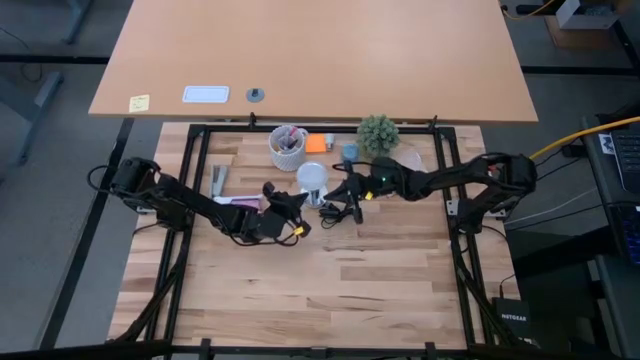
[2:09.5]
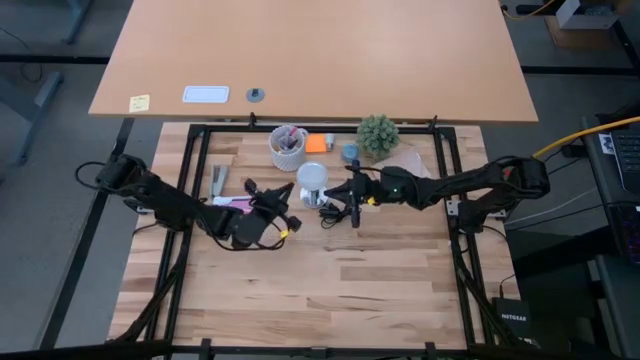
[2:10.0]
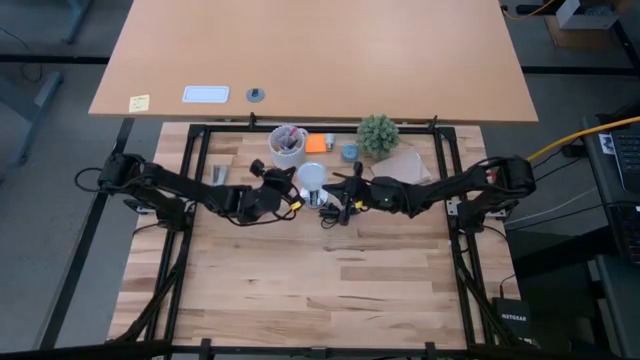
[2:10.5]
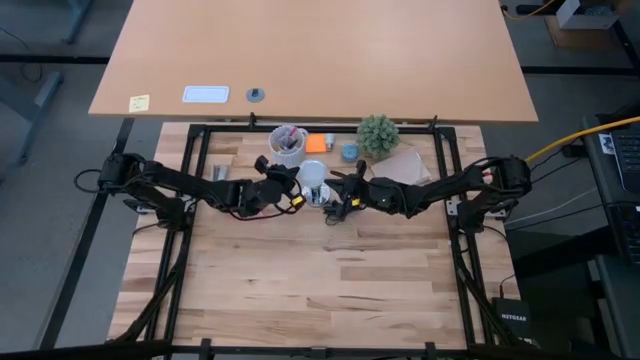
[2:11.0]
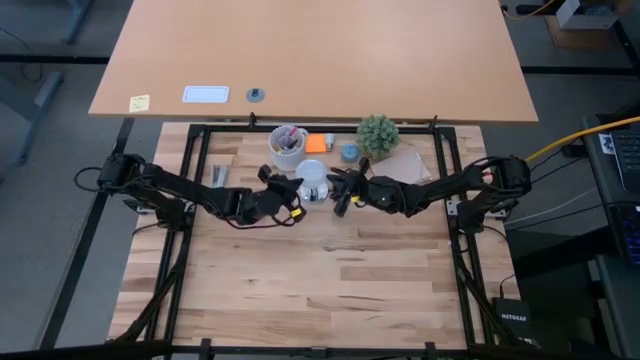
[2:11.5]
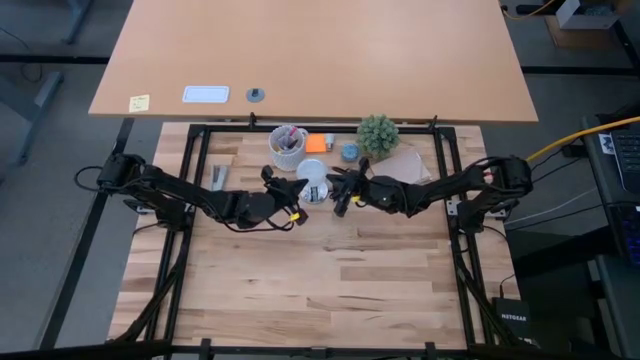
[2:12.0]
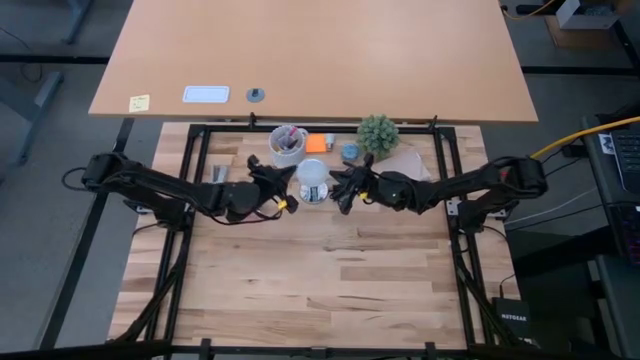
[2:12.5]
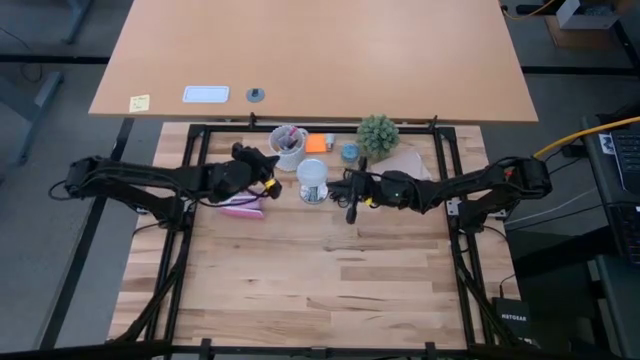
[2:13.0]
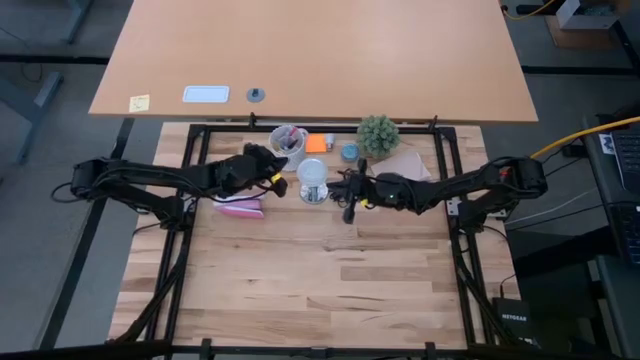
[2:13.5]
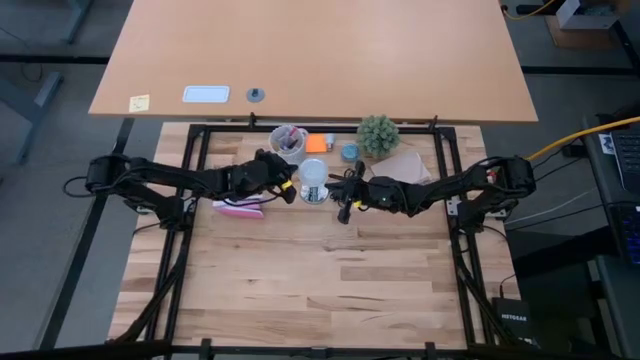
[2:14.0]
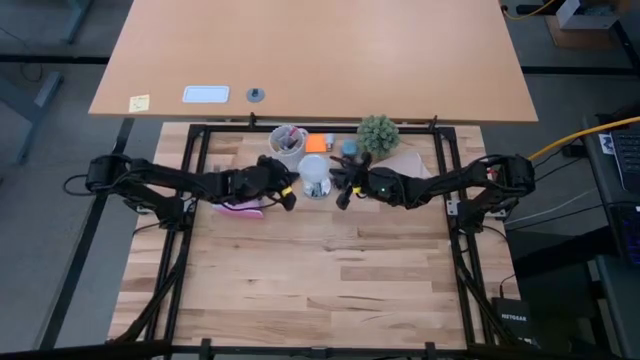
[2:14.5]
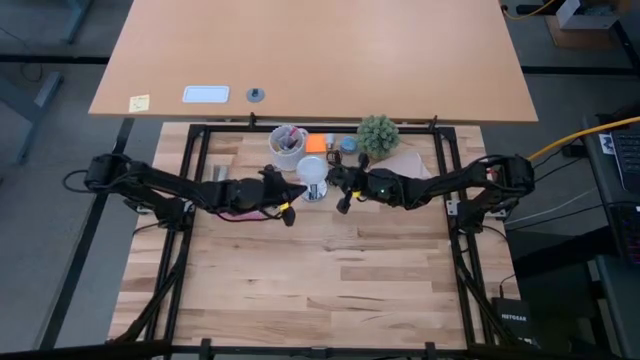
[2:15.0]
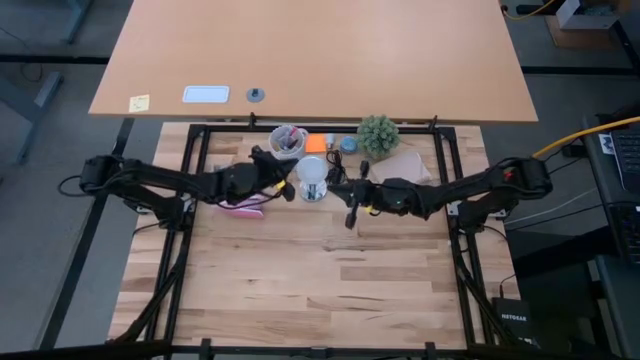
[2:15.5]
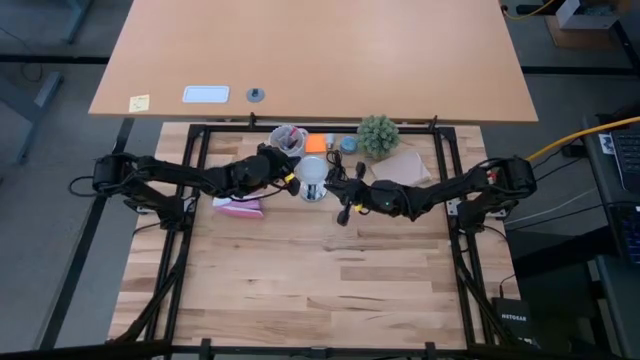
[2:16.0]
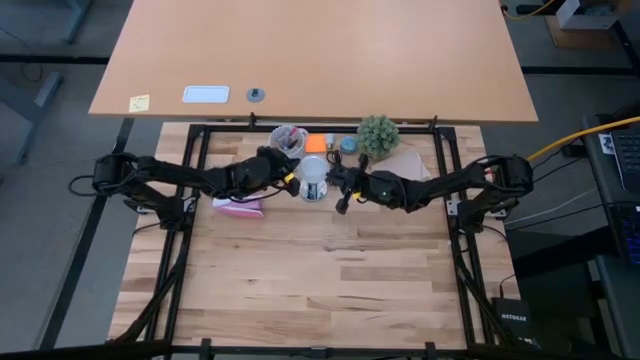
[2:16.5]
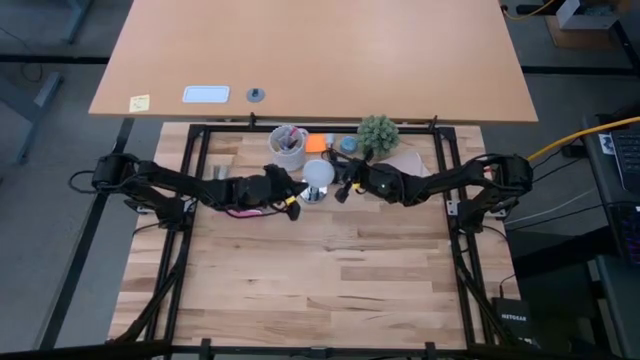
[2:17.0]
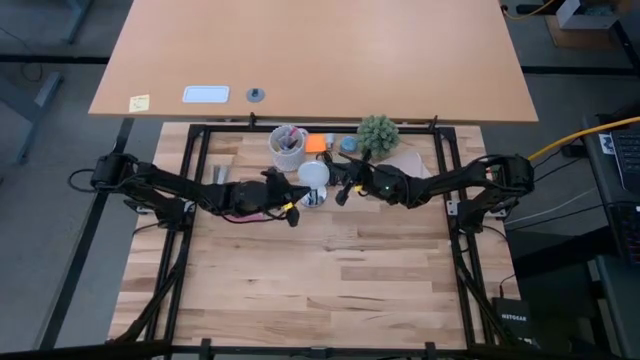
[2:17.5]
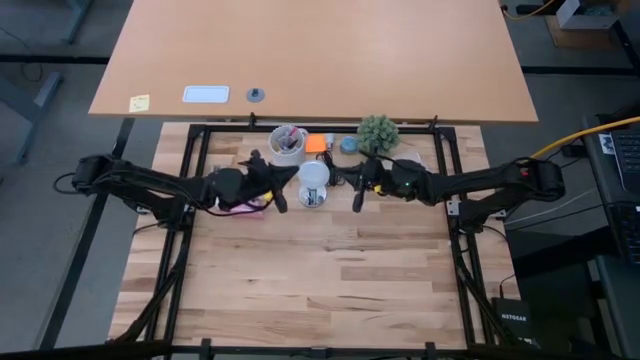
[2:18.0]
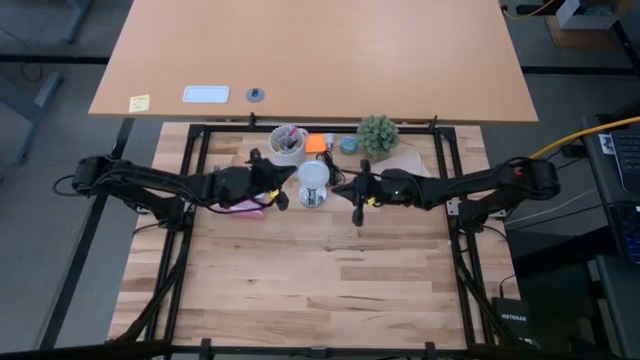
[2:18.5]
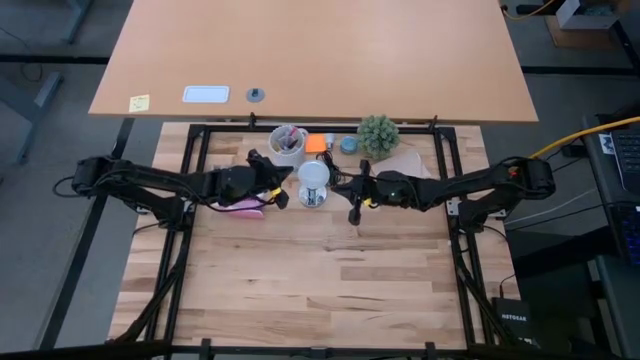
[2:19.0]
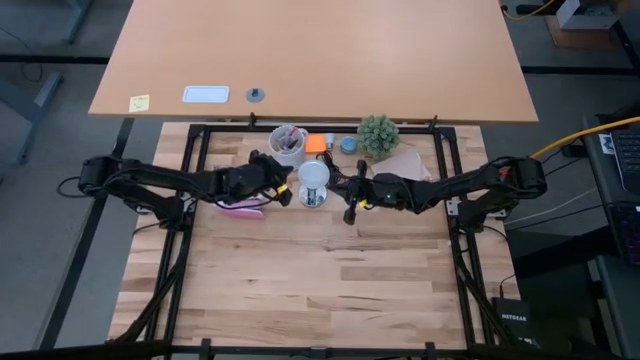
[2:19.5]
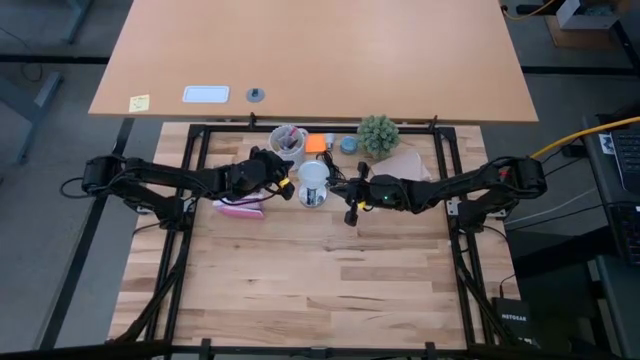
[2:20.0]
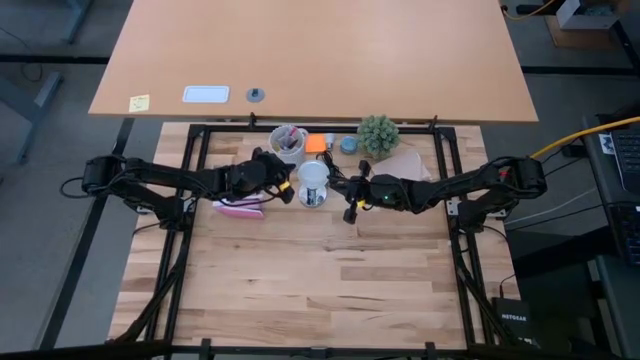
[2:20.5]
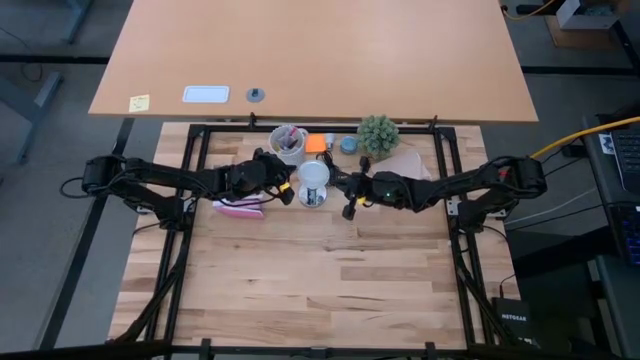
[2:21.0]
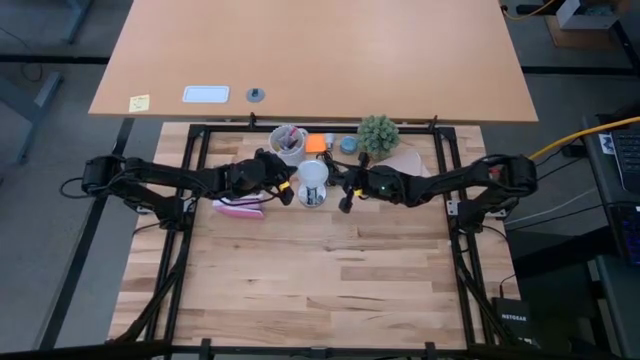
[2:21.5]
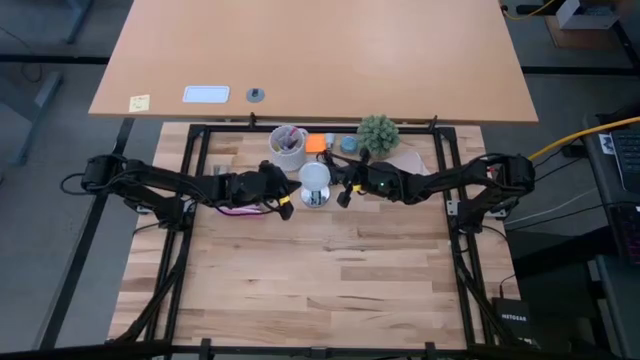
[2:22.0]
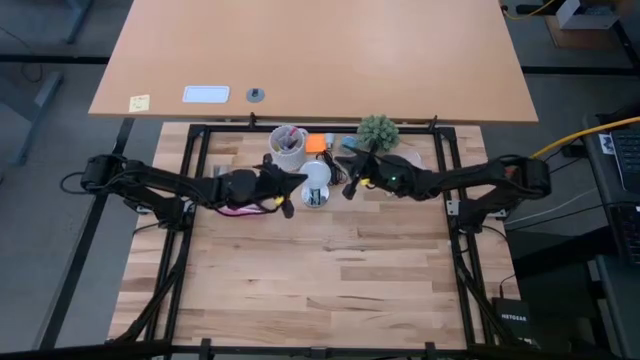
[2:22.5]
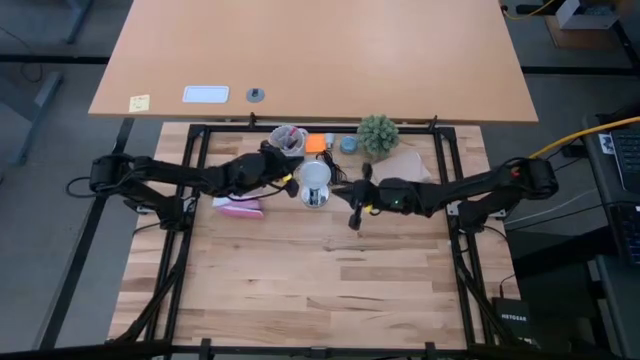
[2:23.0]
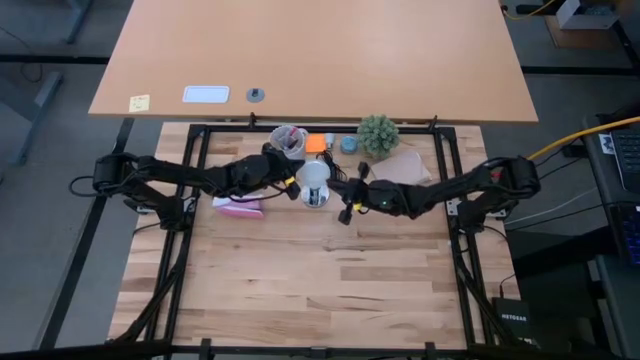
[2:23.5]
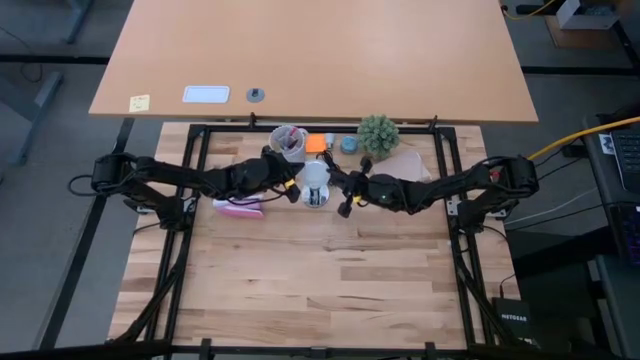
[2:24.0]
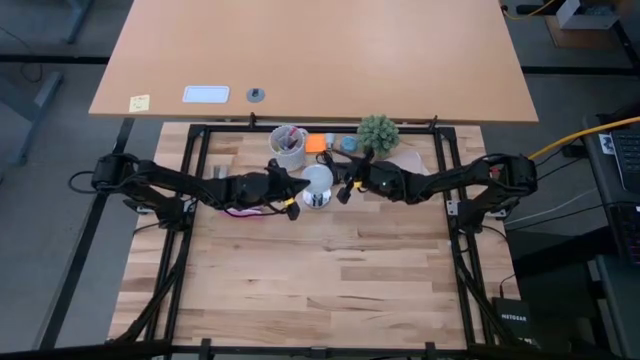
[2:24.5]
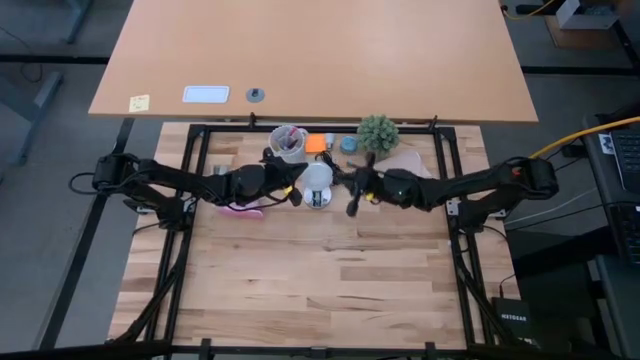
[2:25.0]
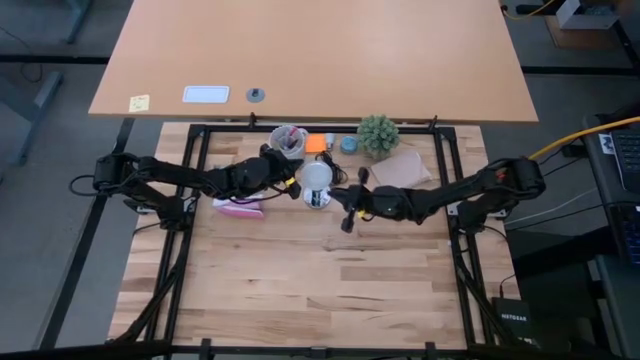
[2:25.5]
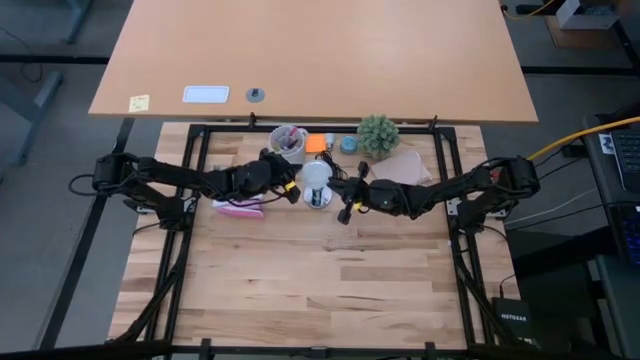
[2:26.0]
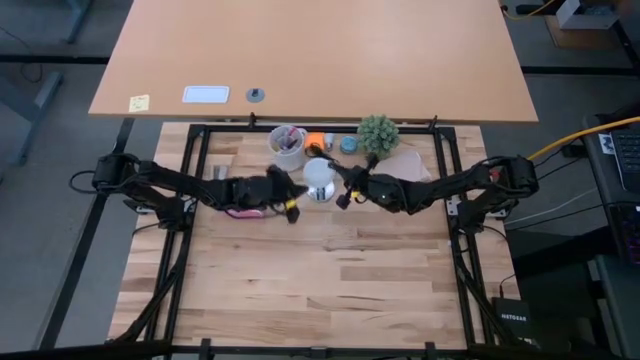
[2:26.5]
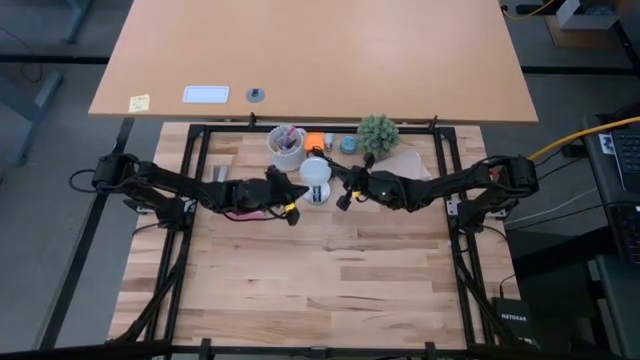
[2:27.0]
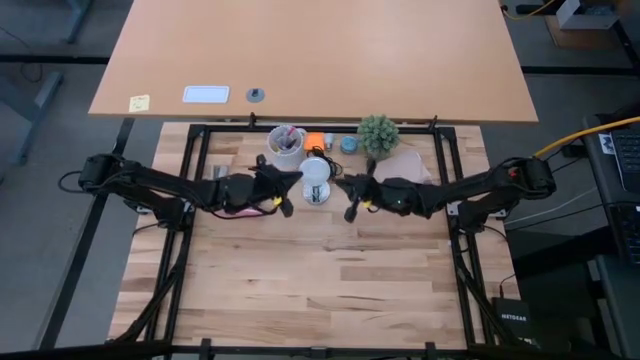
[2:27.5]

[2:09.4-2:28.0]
Task: Screw lightbulb
Remove the white light bulb from the silver lamp
